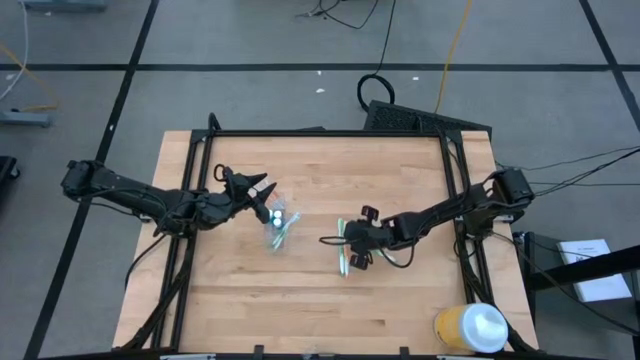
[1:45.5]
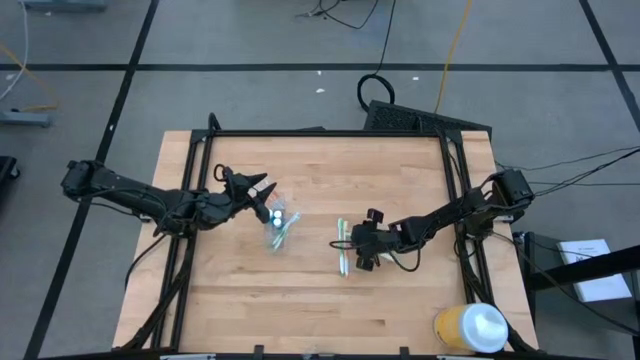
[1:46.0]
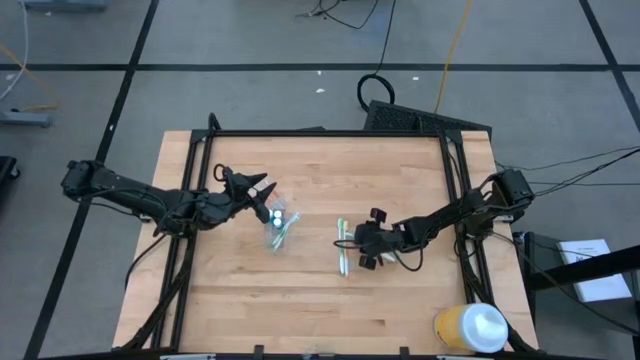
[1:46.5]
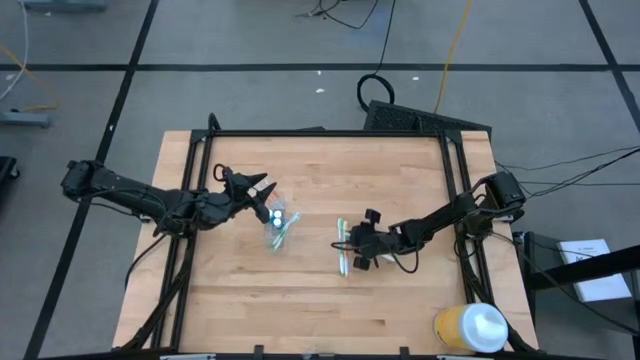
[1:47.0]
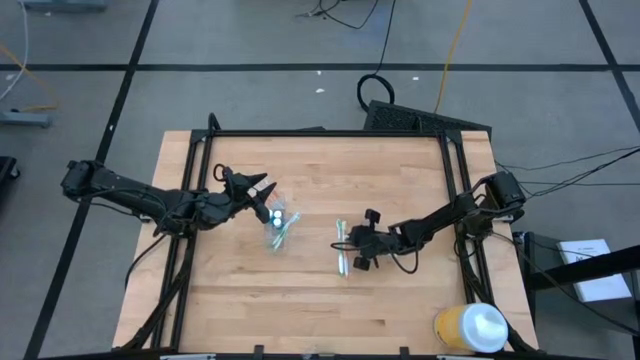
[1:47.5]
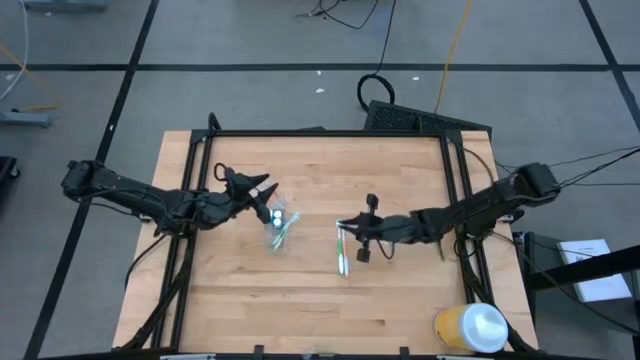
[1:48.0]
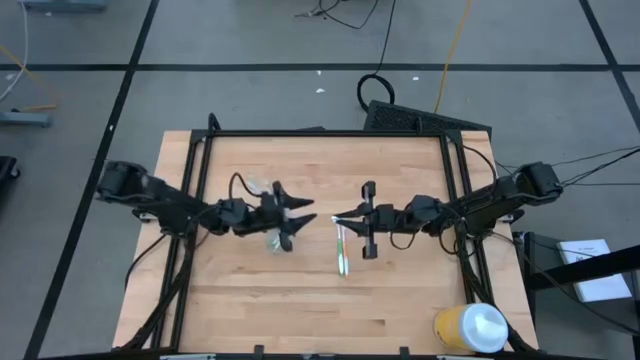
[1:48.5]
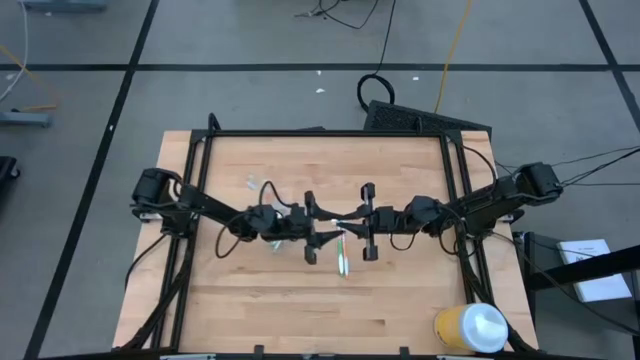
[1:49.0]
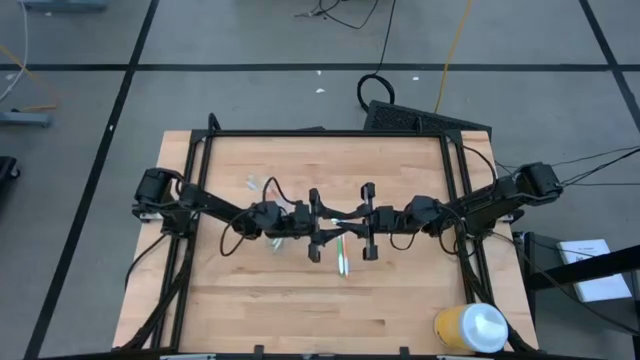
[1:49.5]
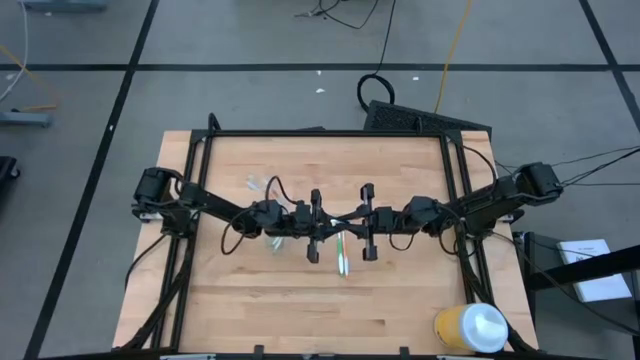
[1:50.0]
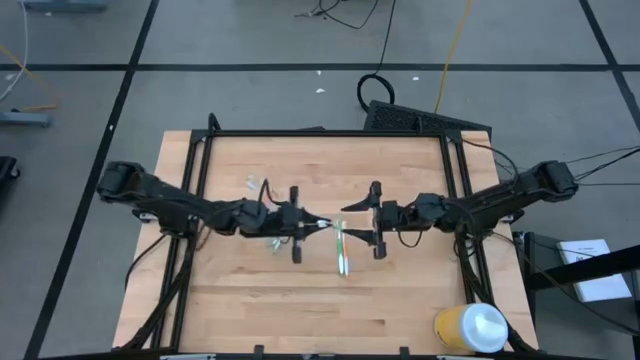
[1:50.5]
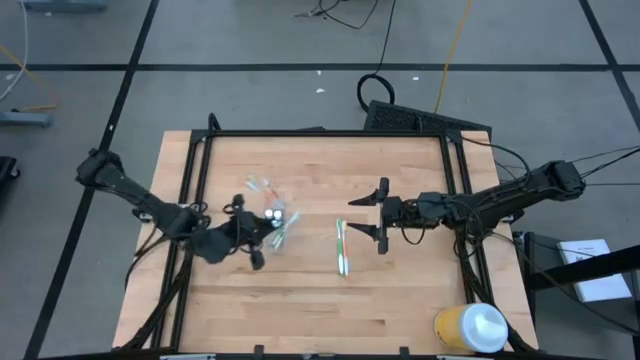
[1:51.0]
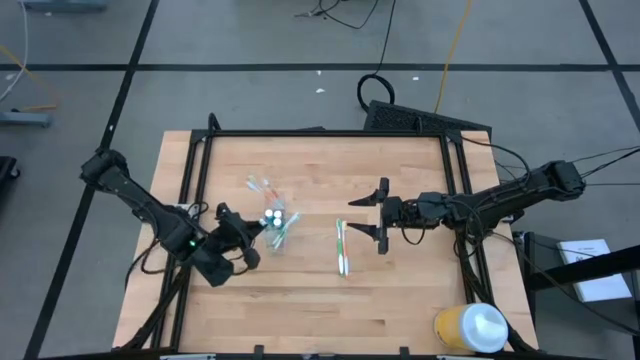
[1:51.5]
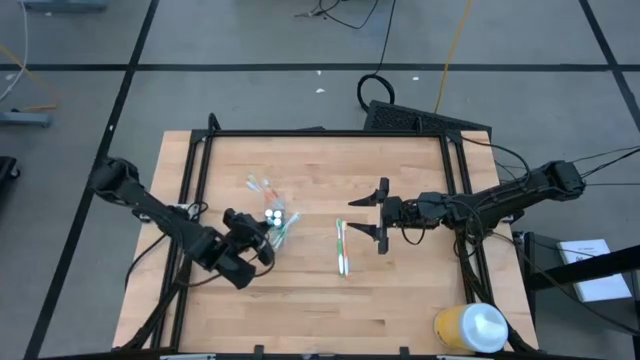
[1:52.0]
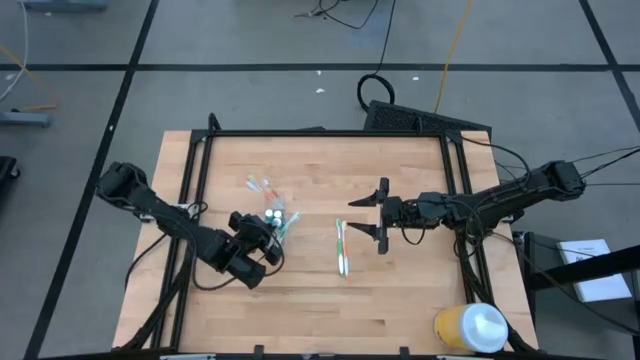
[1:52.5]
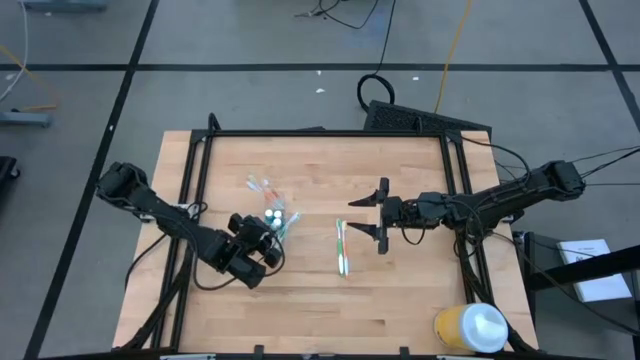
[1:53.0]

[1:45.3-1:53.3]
Task: Pick & Place toothbrushing station
Put the green toothbrush in the transparent organizer

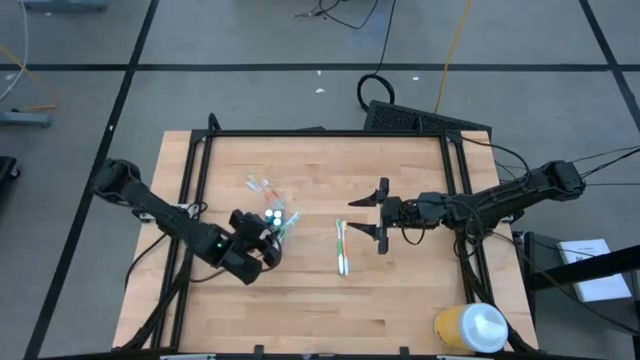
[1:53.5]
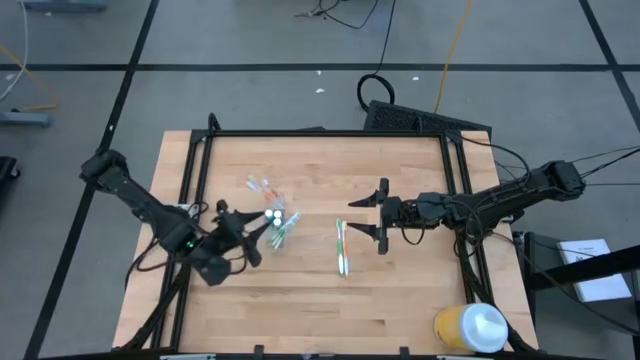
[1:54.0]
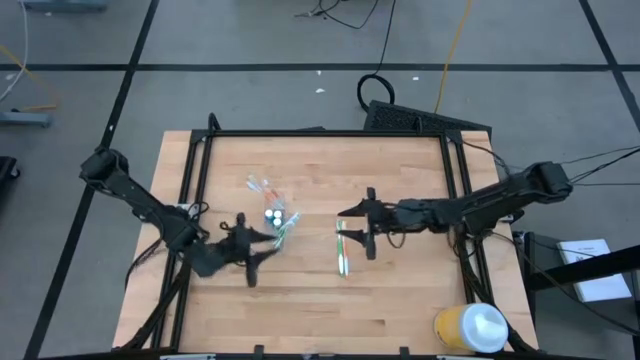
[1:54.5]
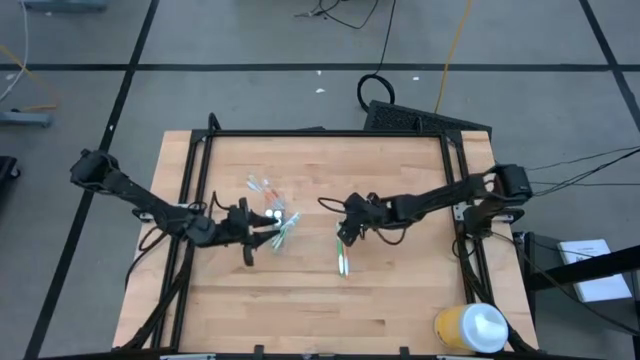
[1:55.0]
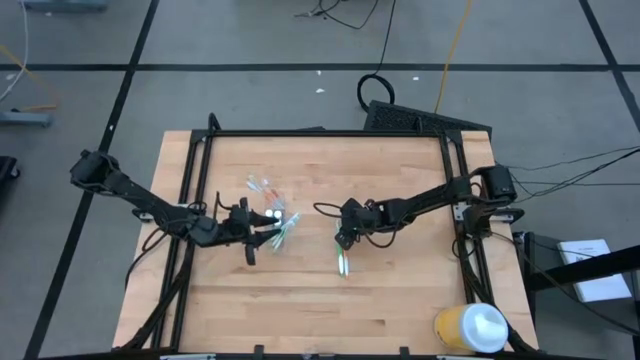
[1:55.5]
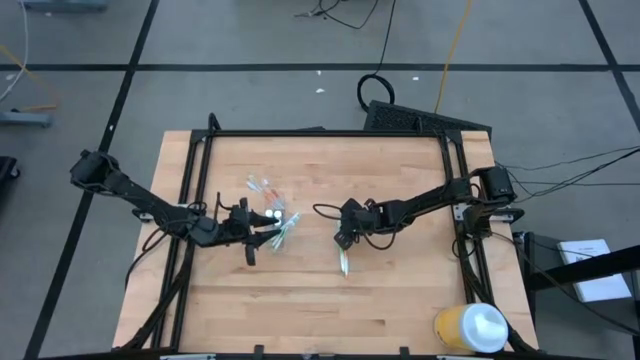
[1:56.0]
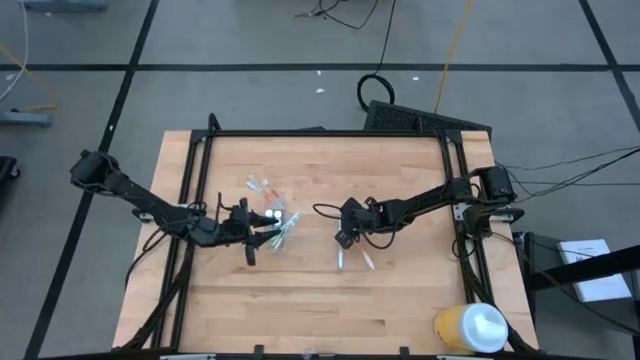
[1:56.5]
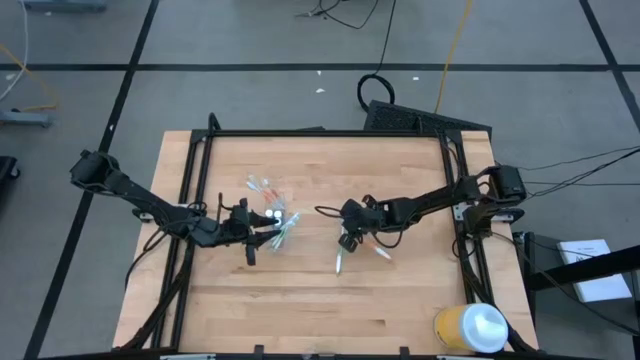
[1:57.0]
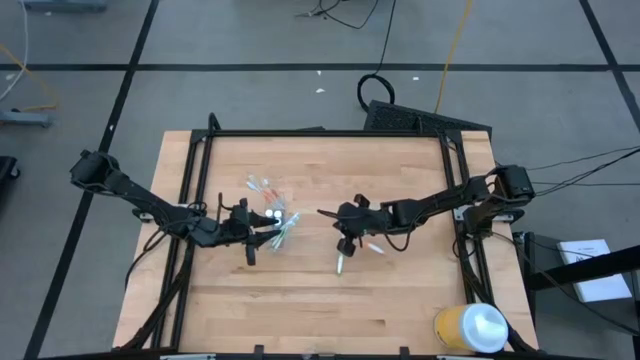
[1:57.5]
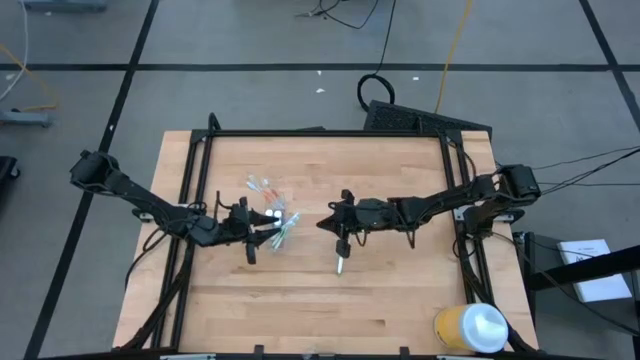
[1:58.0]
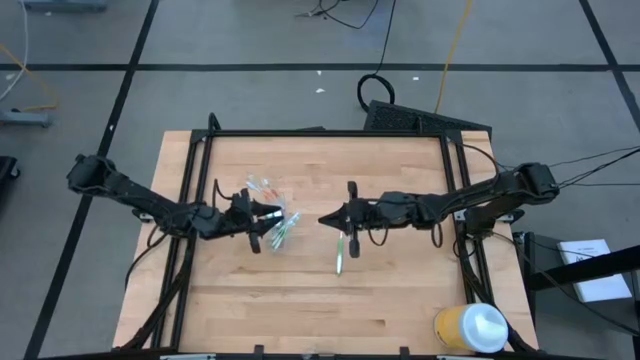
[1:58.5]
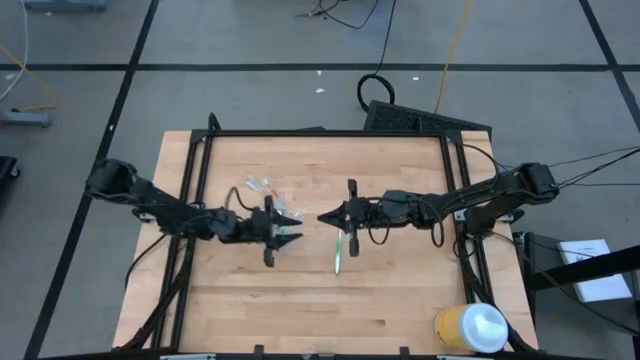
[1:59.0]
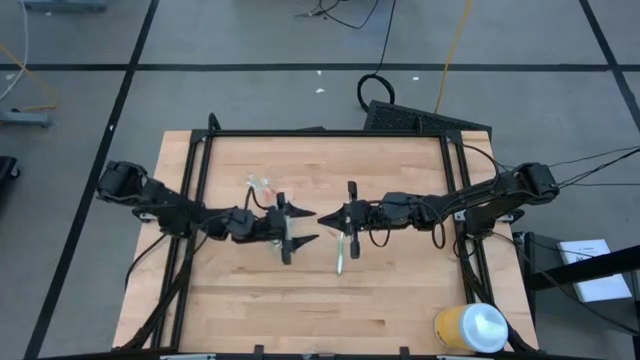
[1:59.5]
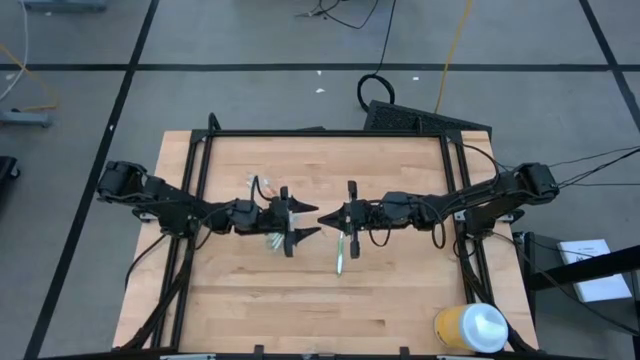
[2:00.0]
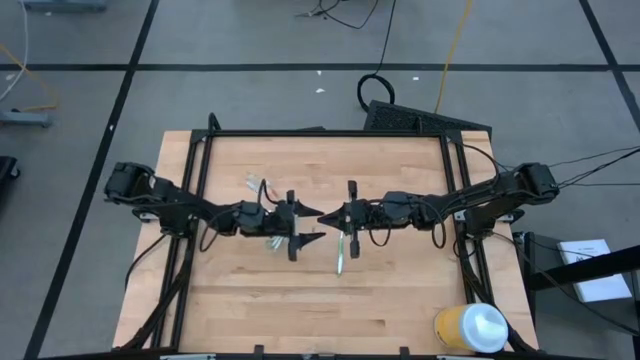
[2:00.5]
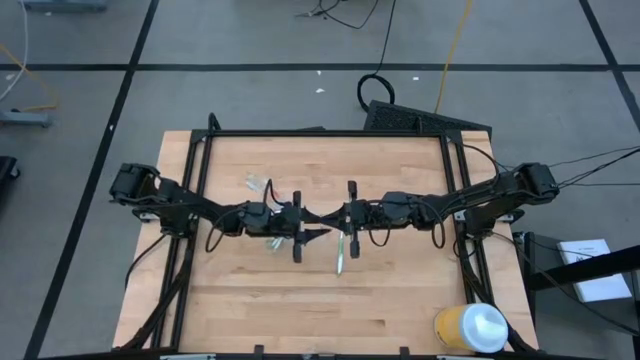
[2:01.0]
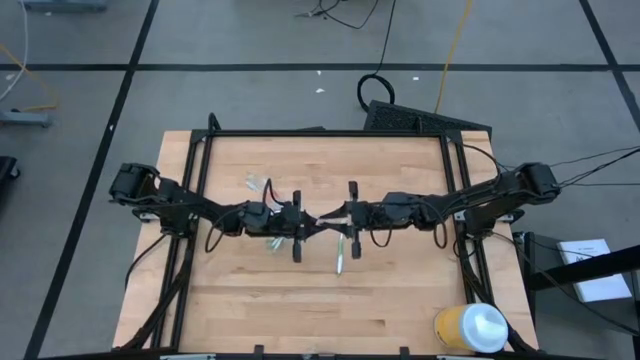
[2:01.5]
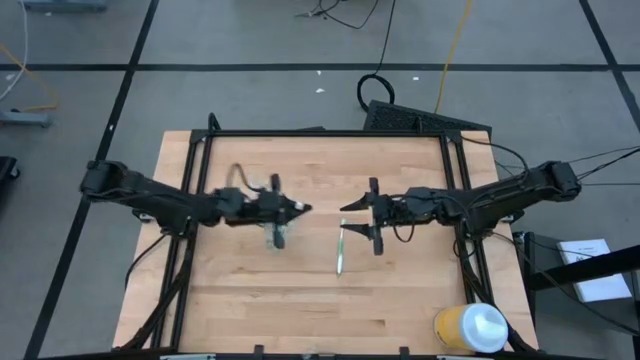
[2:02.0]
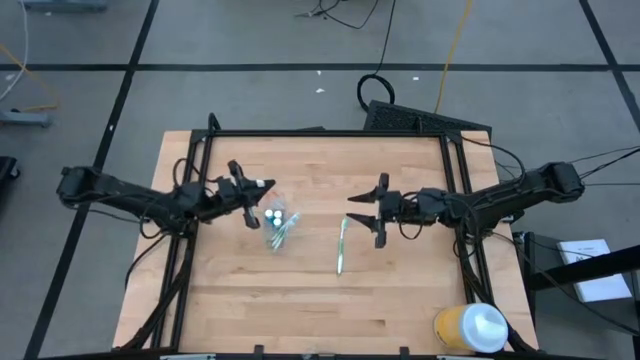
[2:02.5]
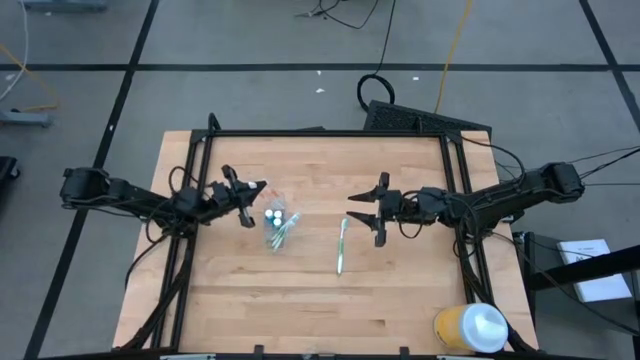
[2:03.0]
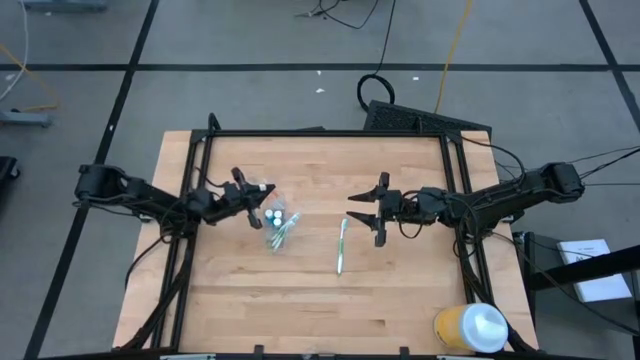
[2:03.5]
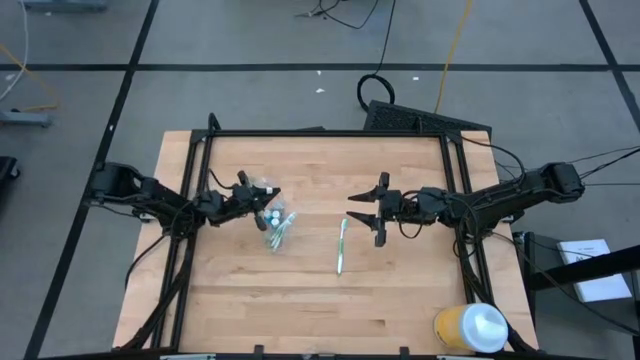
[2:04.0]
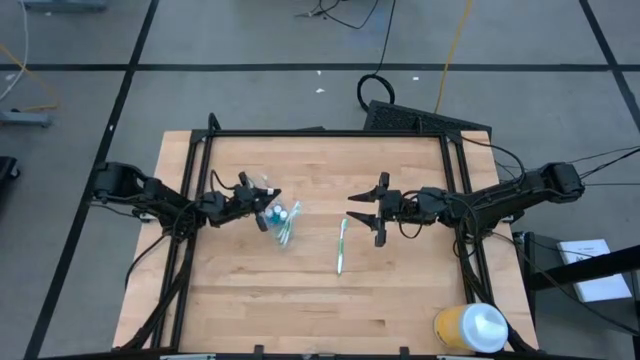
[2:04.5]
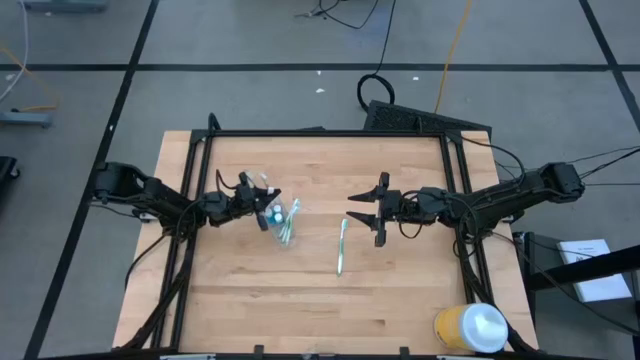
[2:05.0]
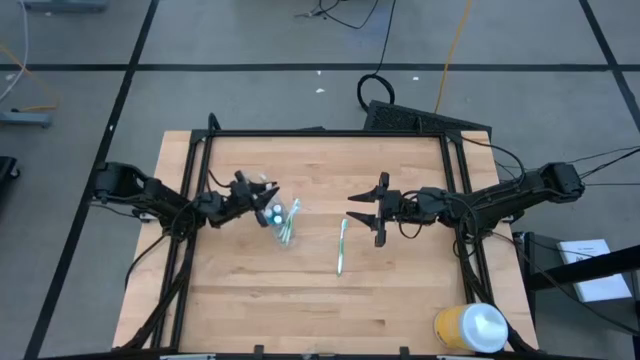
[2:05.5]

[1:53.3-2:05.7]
Put the orange toothbrush in the transparent organizer

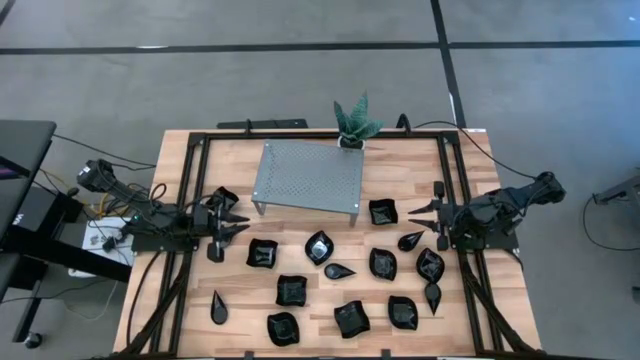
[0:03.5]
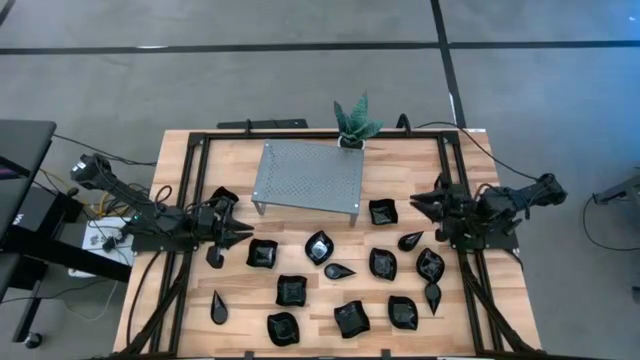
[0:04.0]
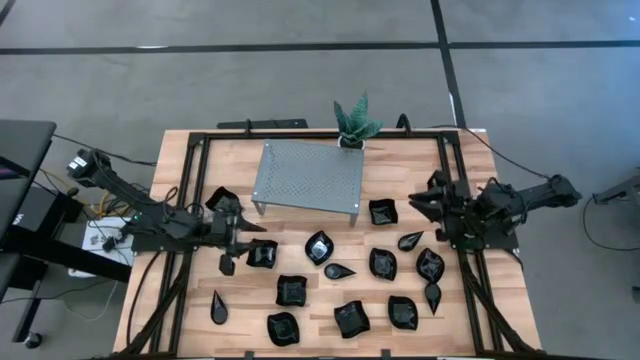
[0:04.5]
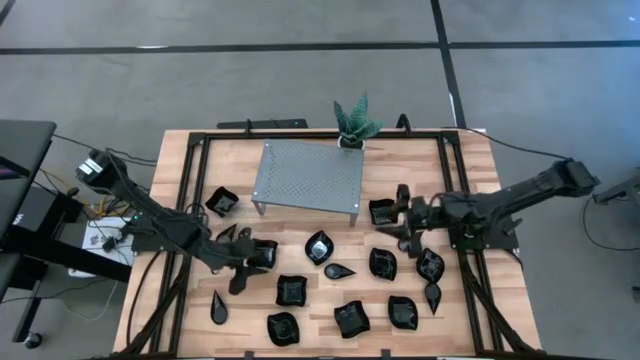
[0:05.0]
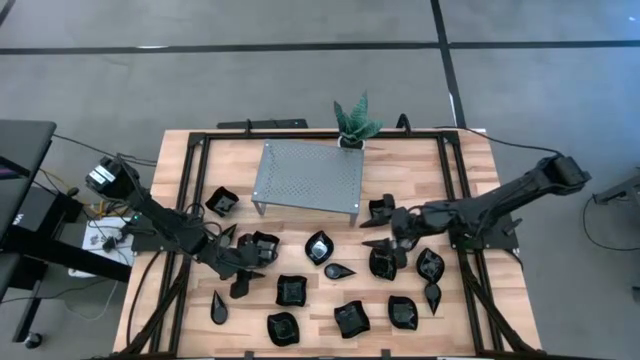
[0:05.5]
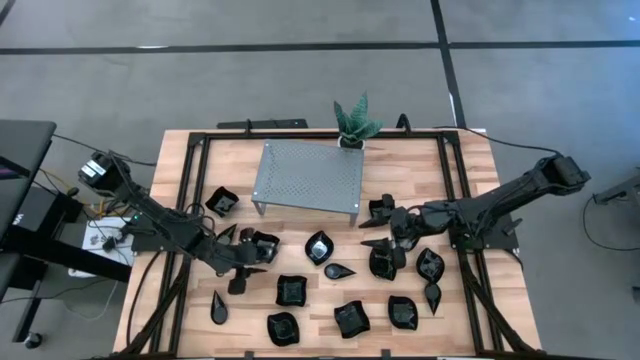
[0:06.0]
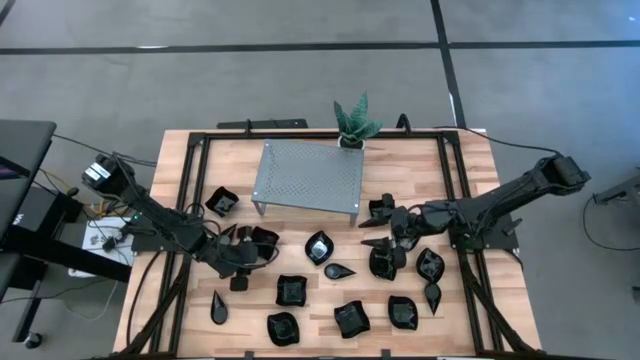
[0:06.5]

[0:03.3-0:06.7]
Task: Pick & Place Mini shaped plates
Put the black distorted square plate on the shelf
